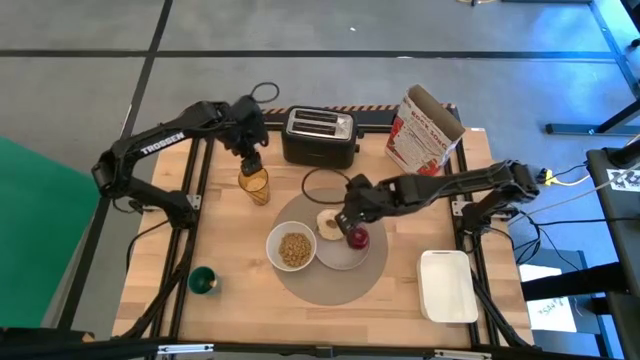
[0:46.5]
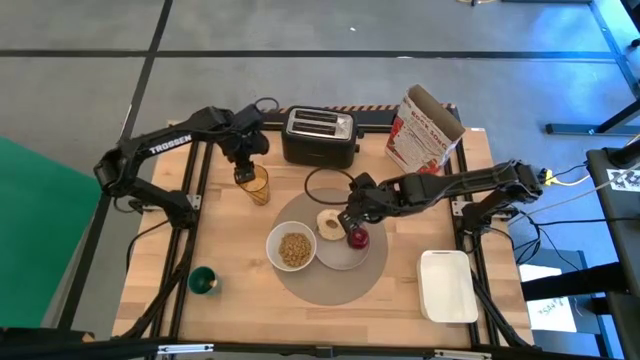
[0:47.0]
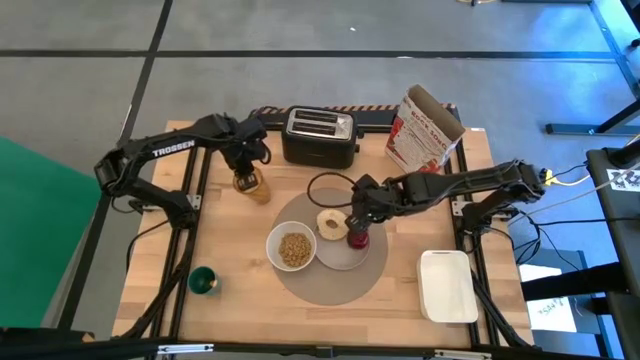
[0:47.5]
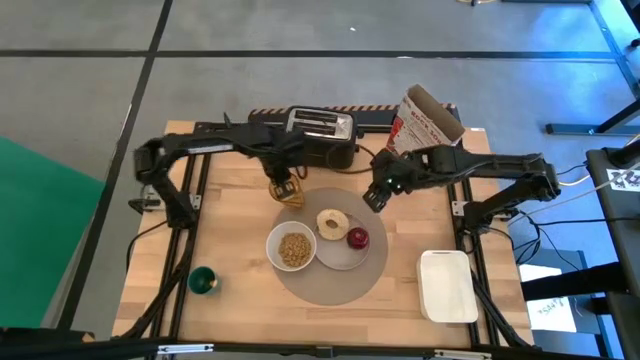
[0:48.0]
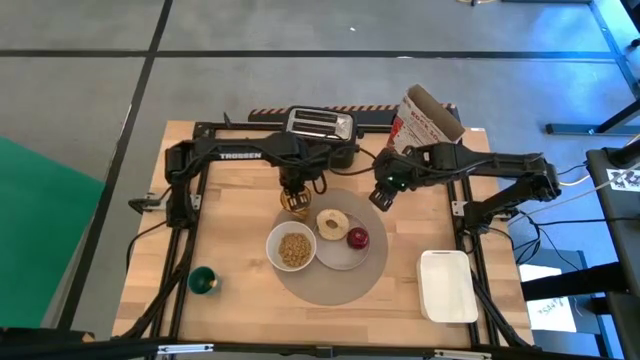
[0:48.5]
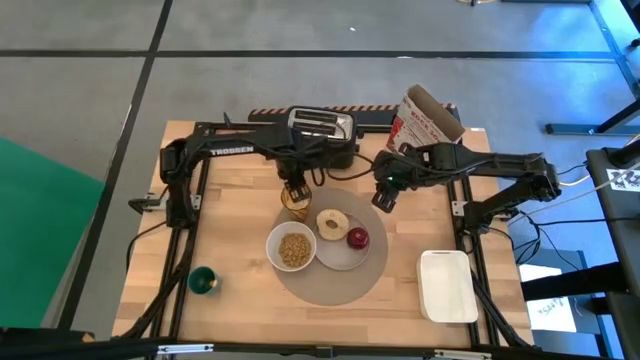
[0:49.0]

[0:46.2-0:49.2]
Task: Arrange a breakfast setting
Put the brown glass on the tablemat at the top left of the gray plate

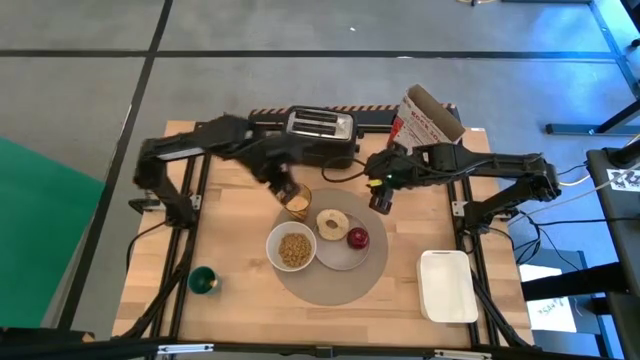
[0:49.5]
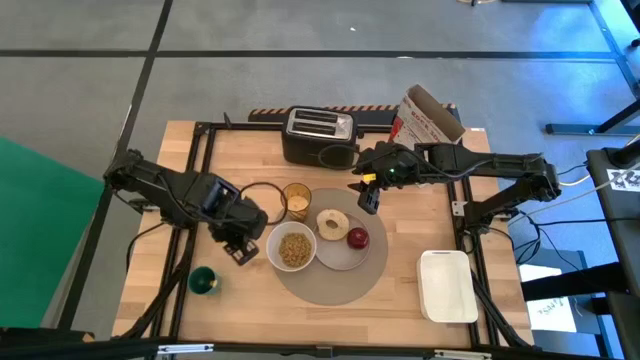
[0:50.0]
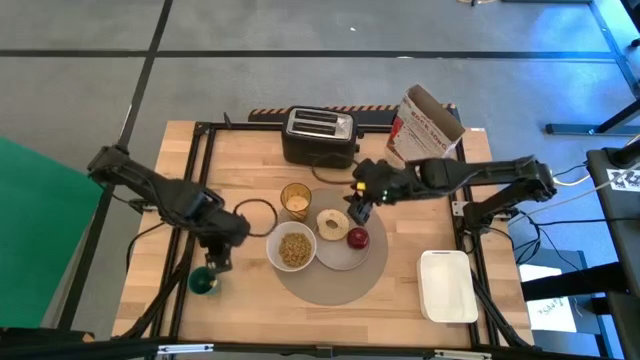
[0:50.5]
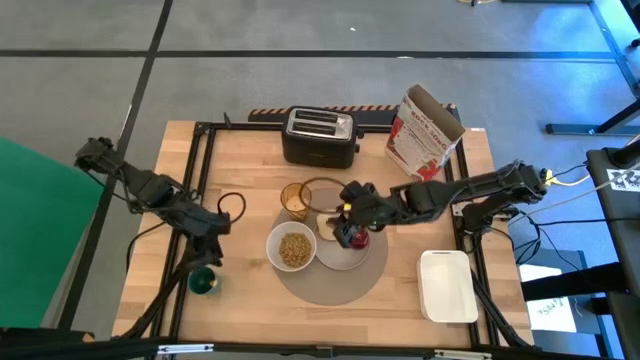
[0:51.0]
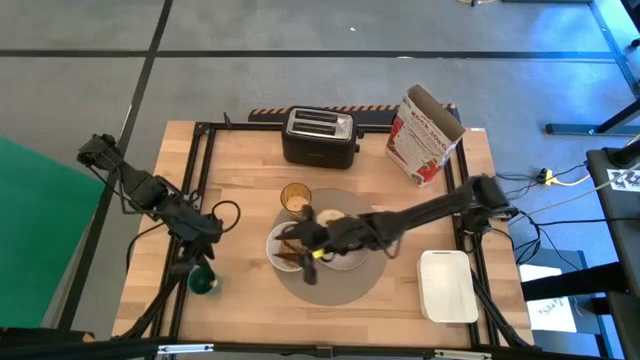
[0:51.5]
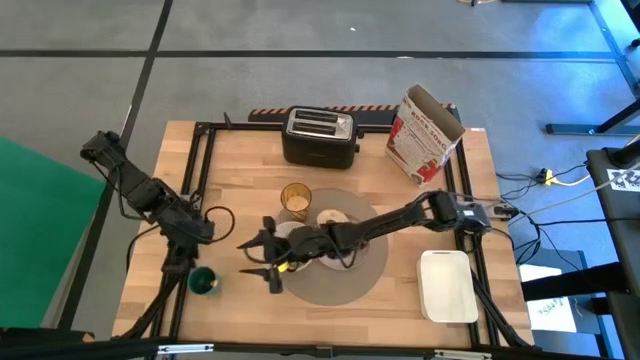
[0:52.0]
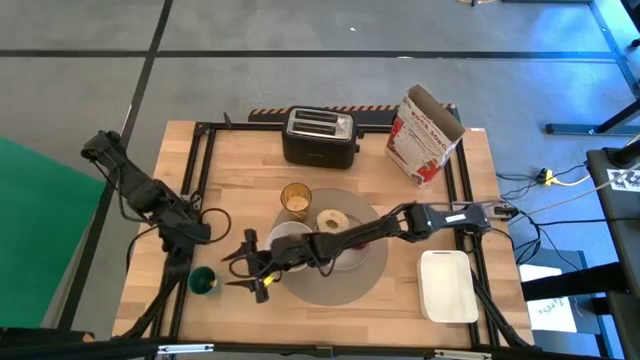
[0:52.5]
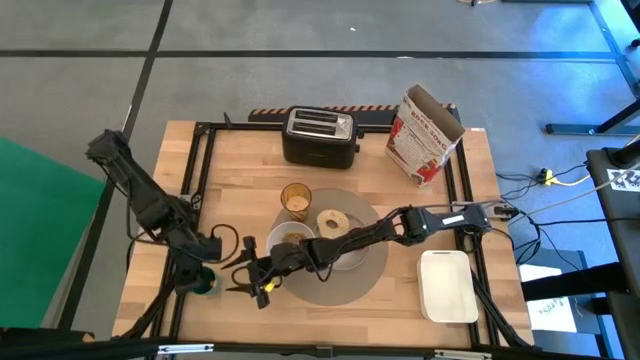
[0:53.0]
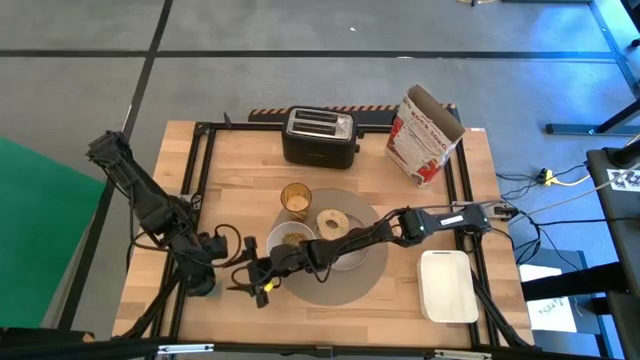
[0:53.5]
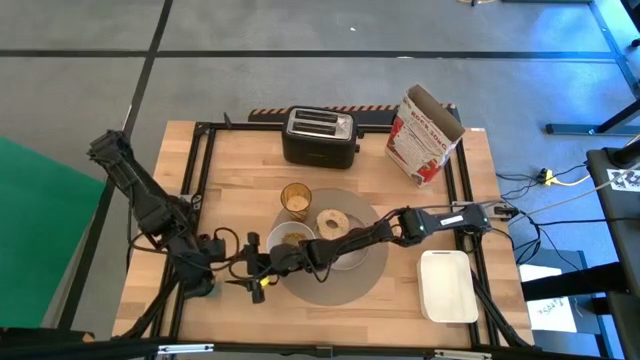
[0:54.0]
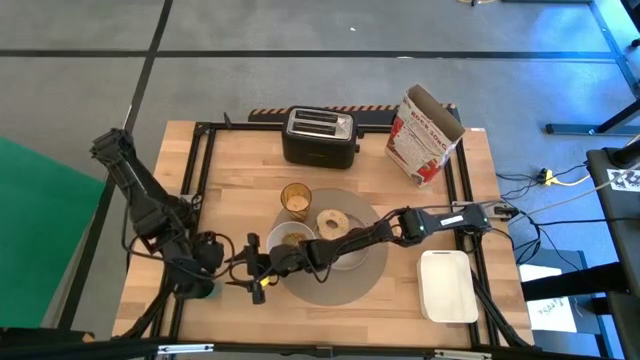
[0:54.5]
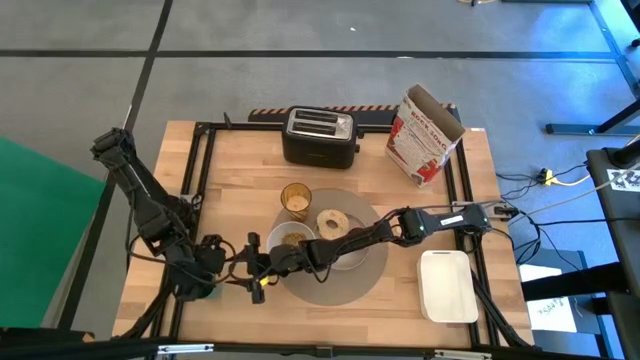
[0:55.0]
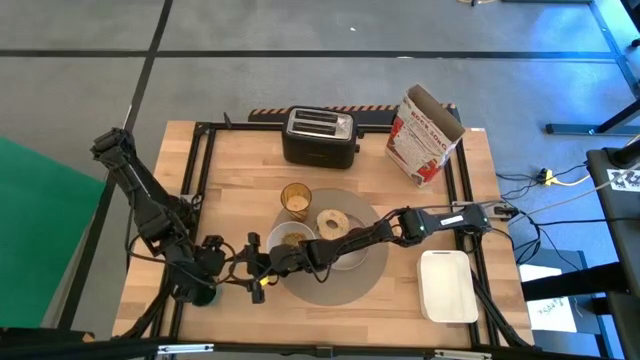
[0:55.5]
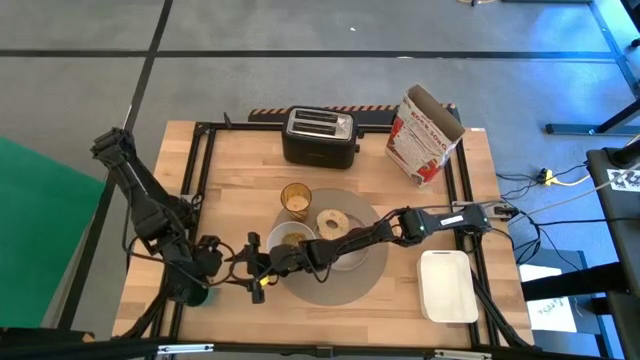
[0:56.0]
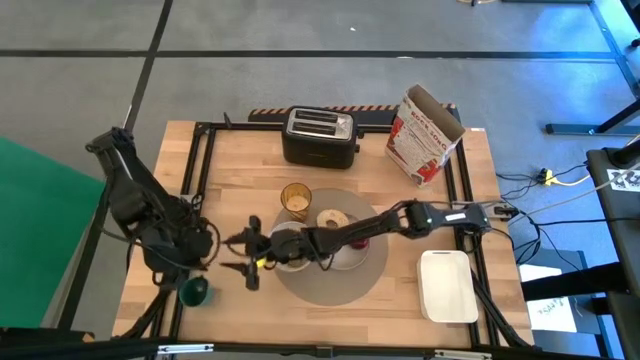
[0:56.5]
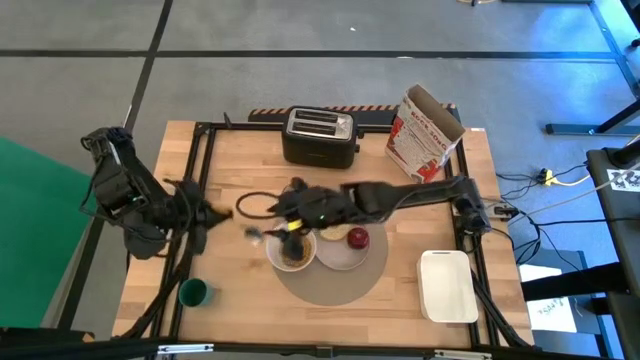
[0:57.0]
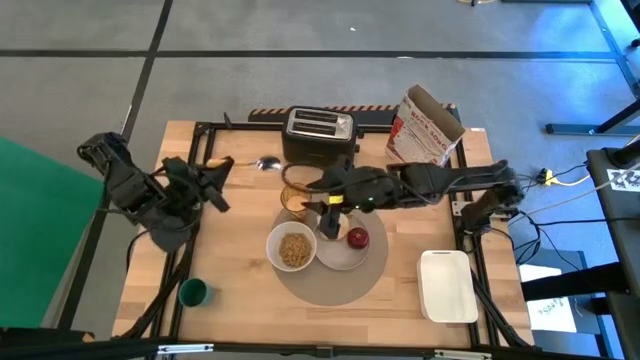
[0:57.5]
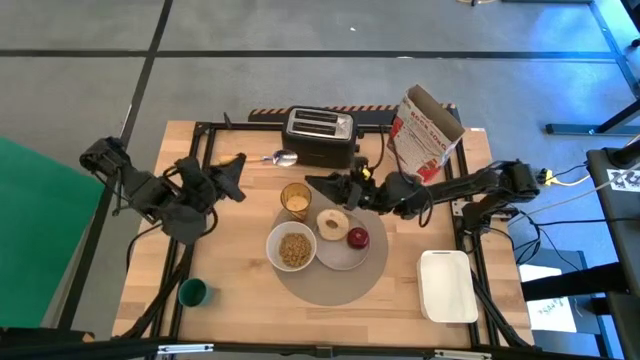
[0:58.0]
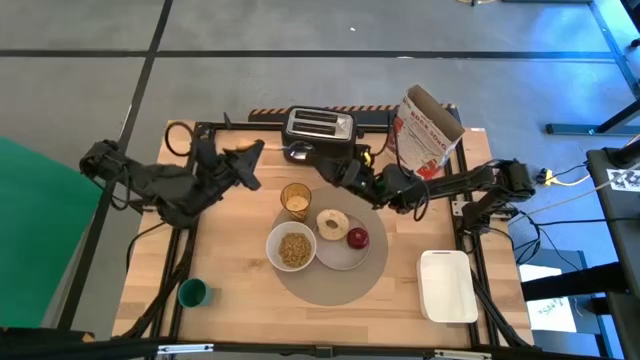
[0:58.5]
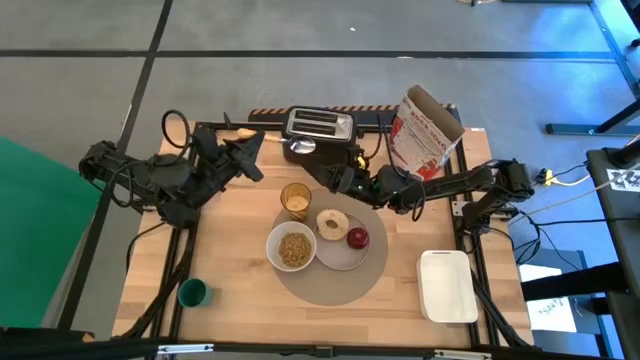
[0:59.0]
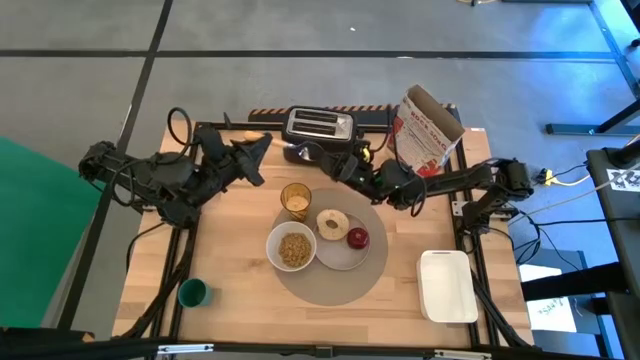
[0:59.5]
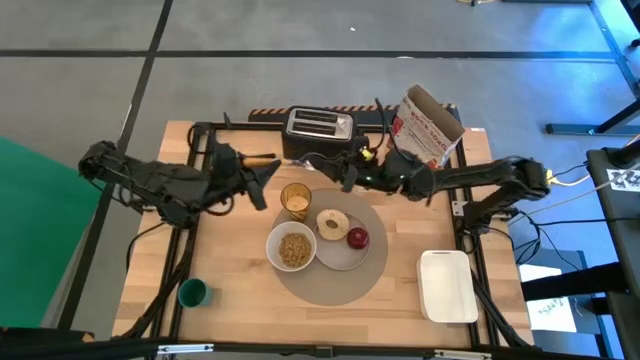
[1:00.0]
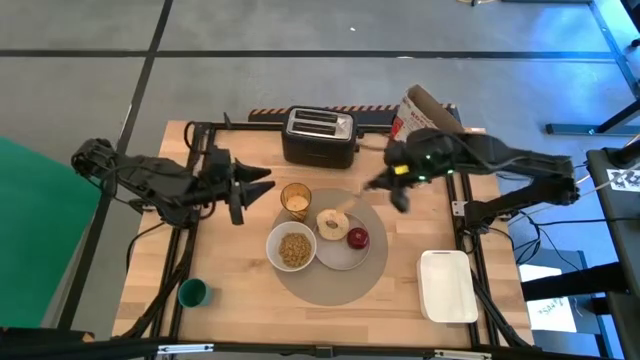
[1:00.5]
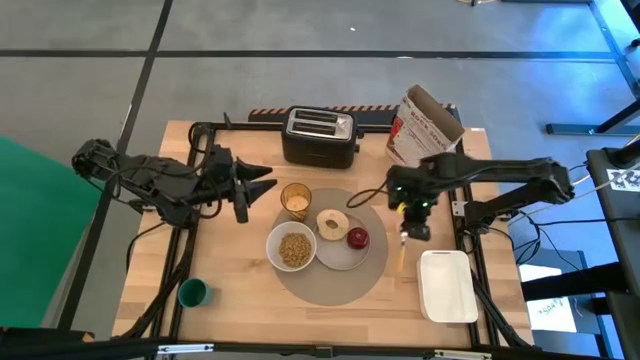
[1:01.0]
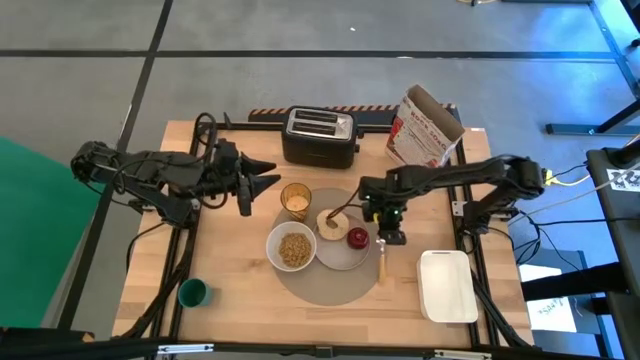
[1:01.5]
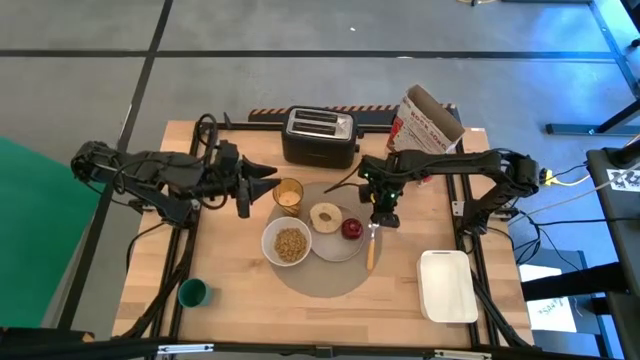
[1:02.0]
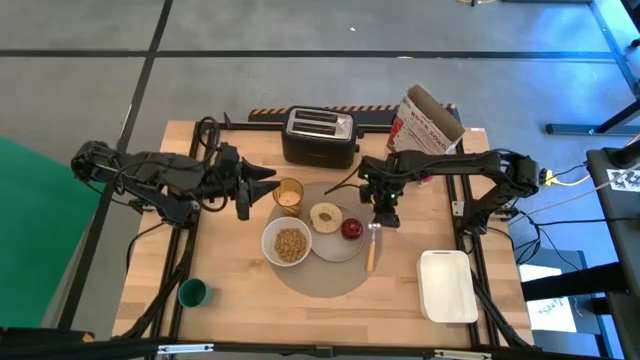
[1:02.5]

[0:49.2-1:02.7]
Put the yellow spoon on the tablemat to the right of the gray plate

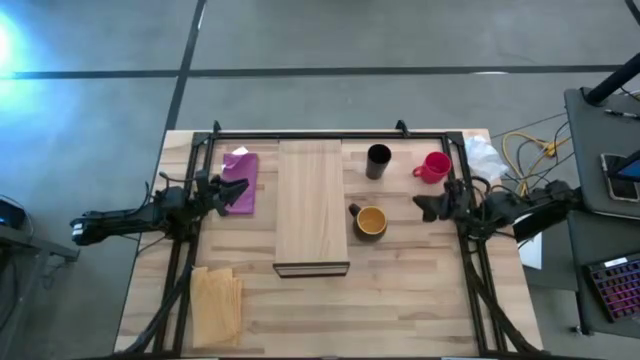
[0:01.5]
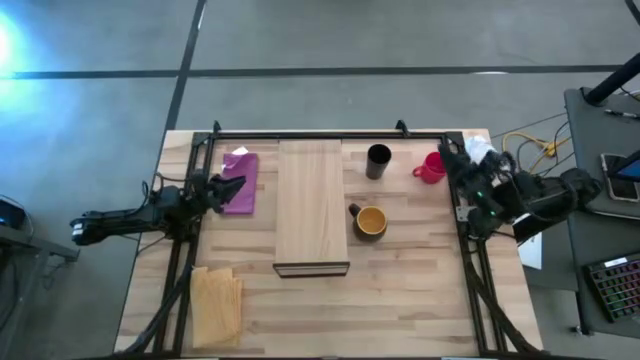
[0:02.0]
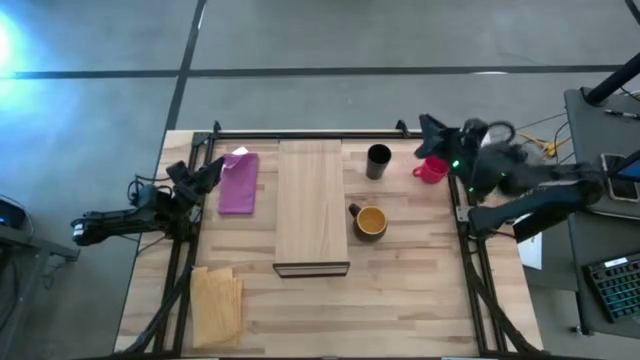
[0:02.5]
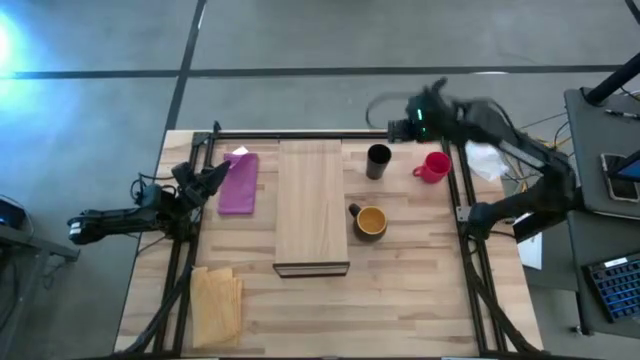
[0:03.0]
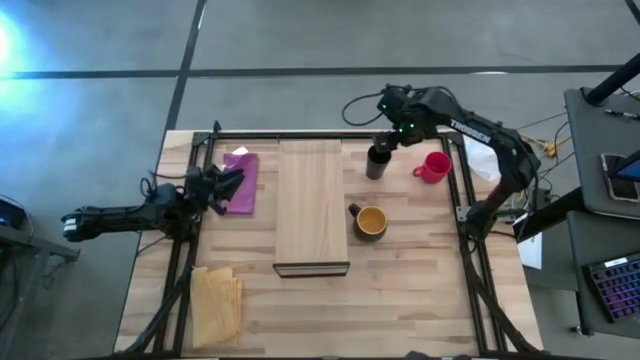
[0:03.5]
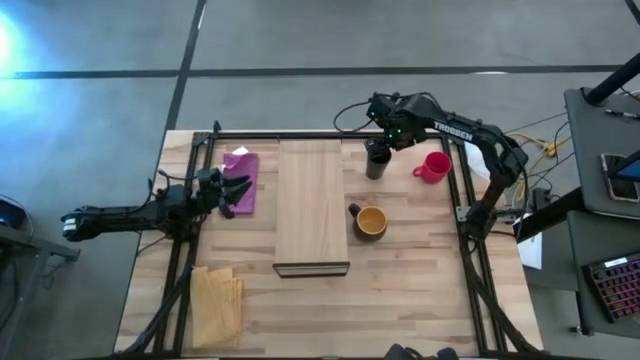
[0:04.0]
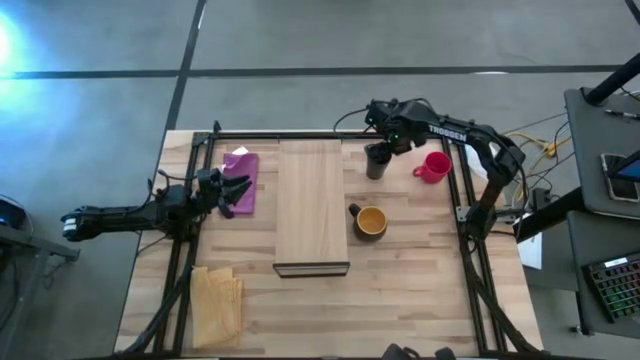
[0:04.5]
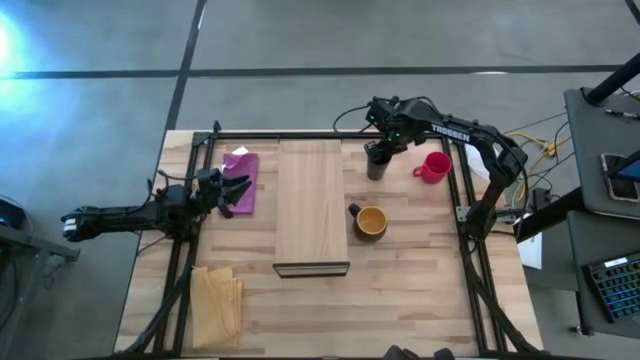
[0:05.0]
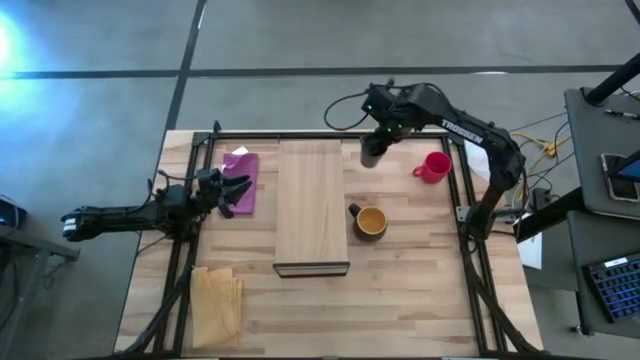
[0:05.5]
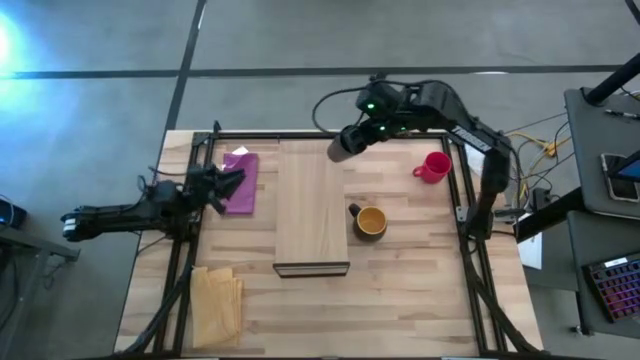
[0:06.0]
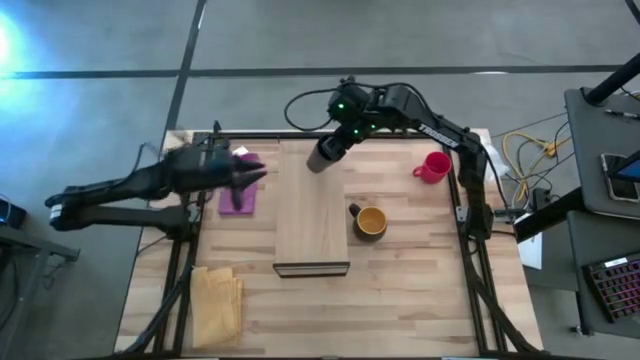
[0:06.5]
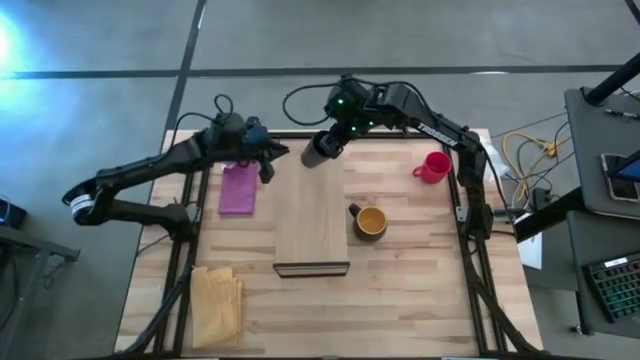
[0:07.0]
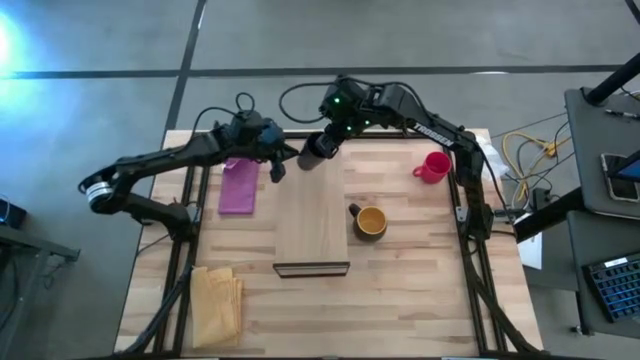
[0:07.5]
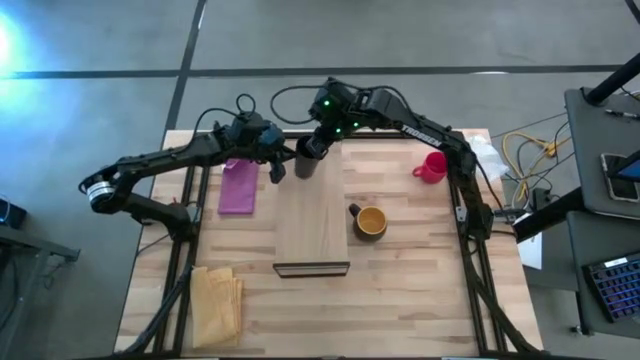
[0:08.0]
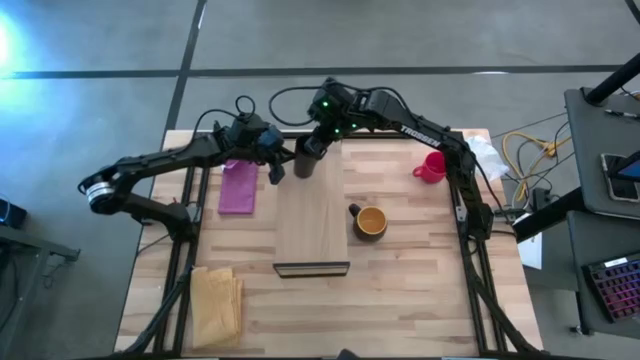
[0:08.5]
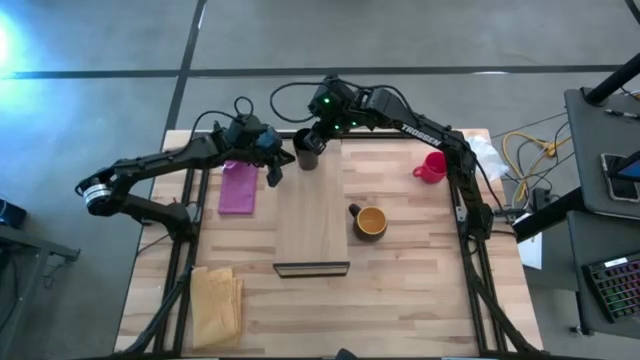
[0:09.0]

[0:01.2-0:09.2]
Task: Stack small to large cups/mugs on shelf
Put the black cup on the shelf
